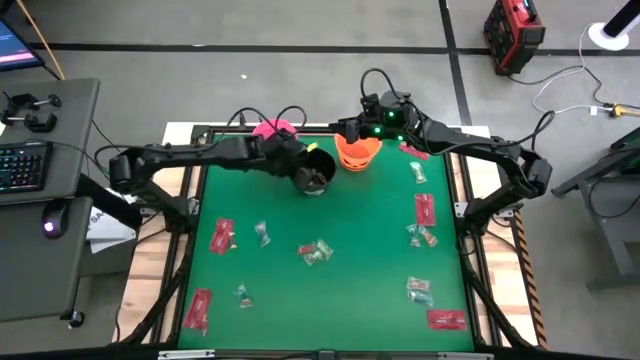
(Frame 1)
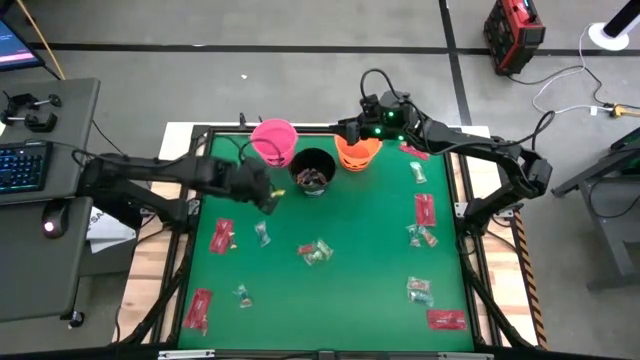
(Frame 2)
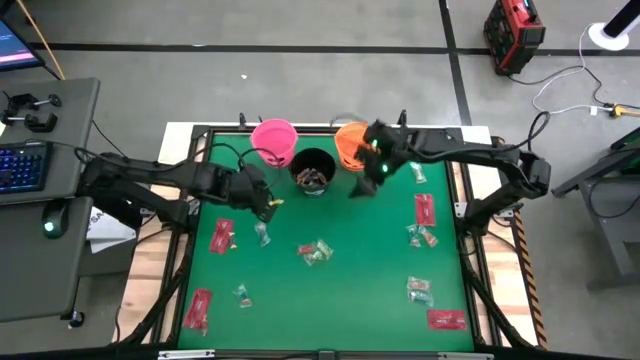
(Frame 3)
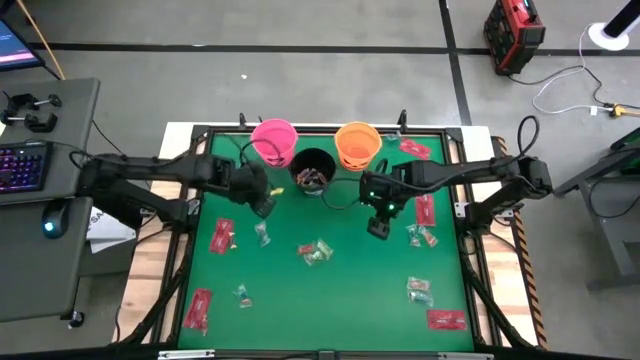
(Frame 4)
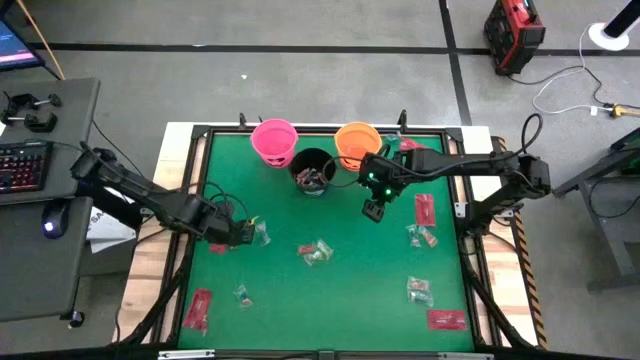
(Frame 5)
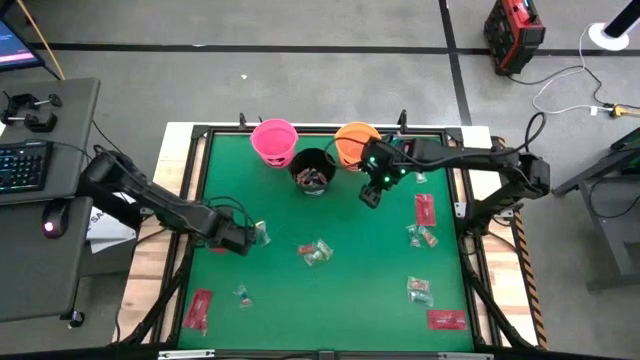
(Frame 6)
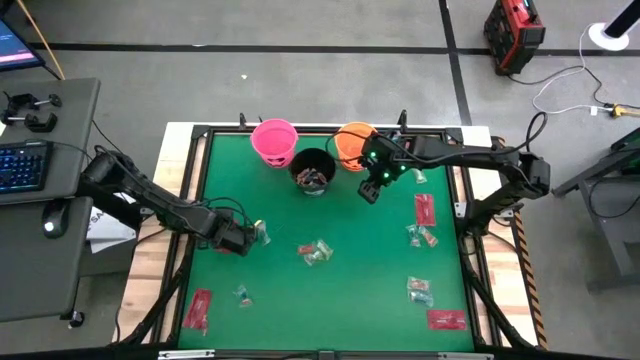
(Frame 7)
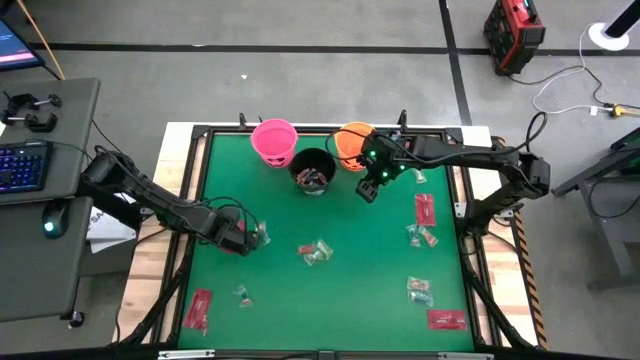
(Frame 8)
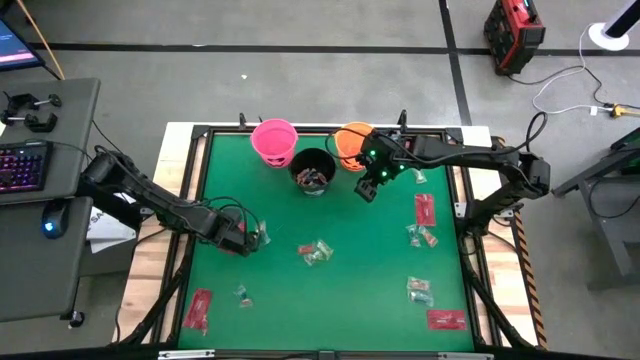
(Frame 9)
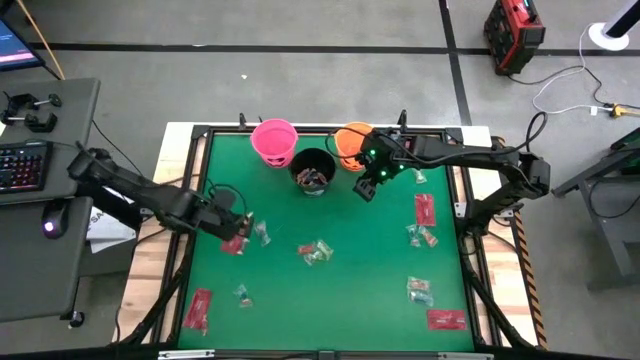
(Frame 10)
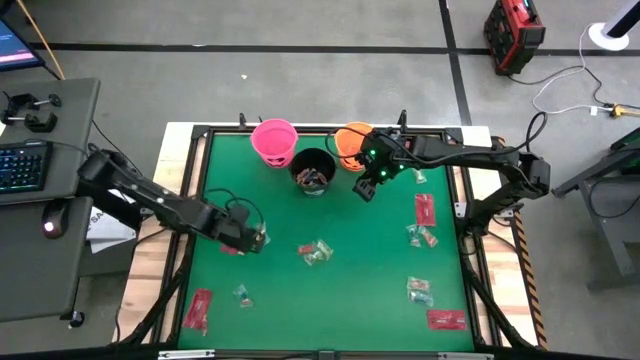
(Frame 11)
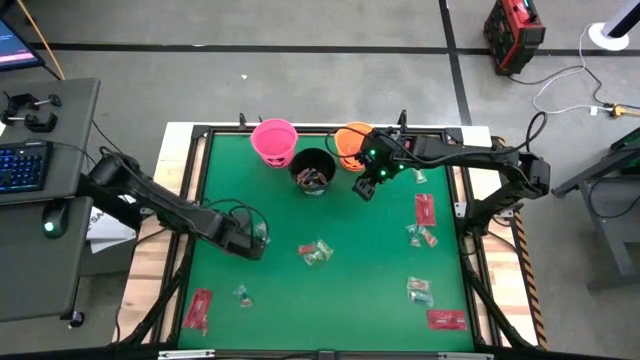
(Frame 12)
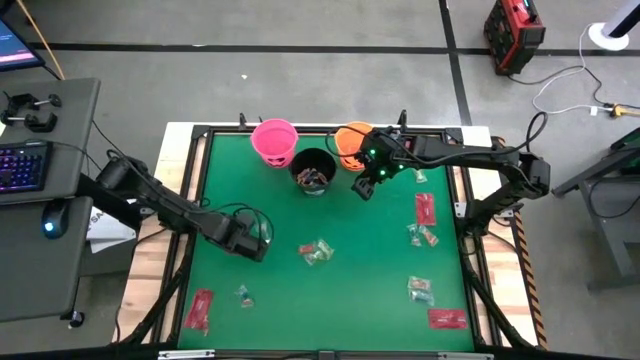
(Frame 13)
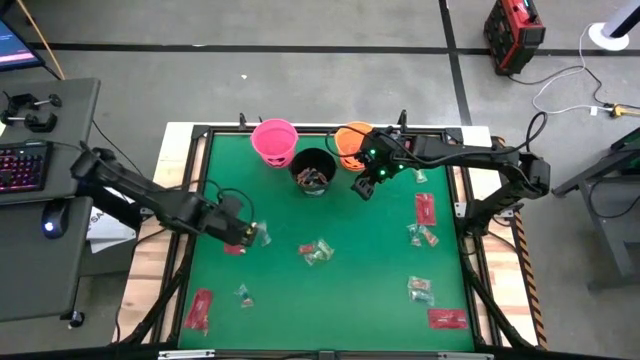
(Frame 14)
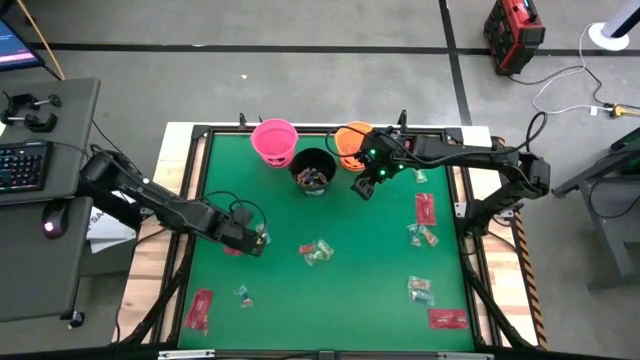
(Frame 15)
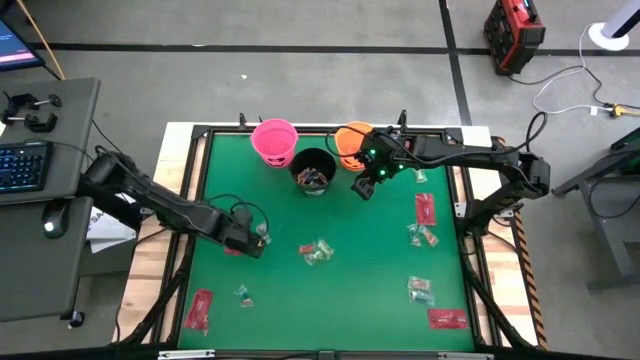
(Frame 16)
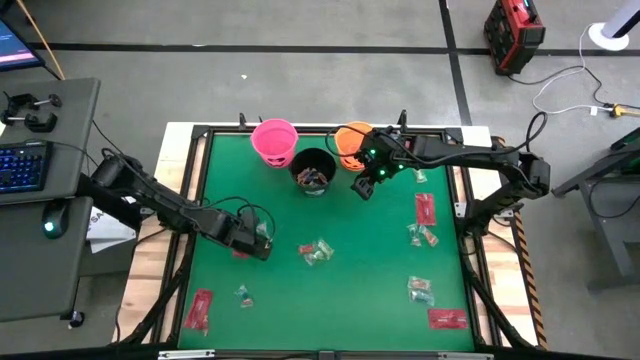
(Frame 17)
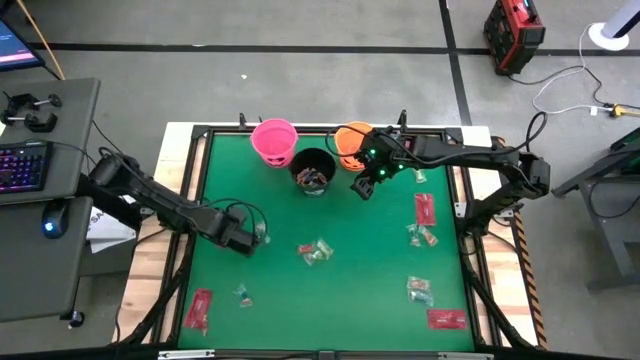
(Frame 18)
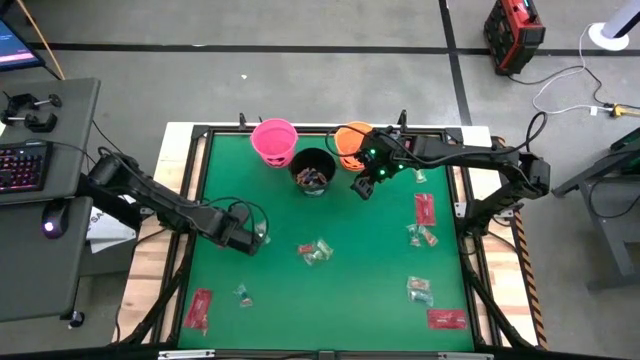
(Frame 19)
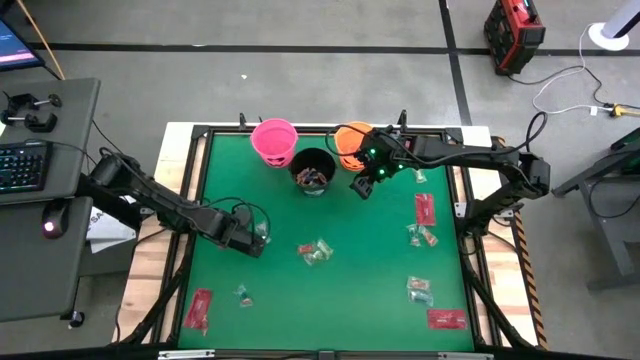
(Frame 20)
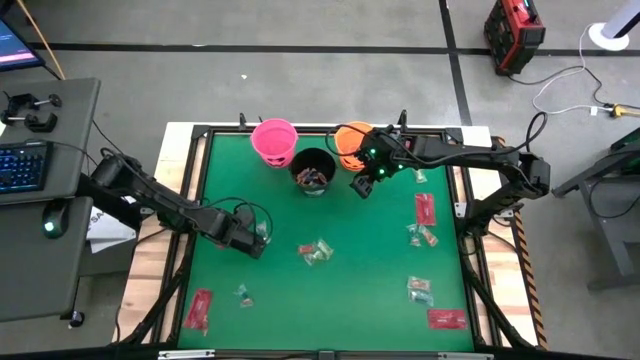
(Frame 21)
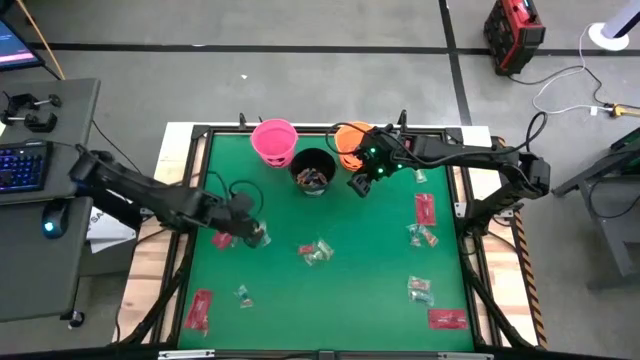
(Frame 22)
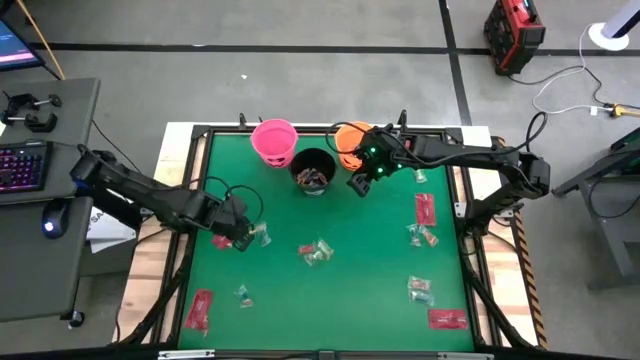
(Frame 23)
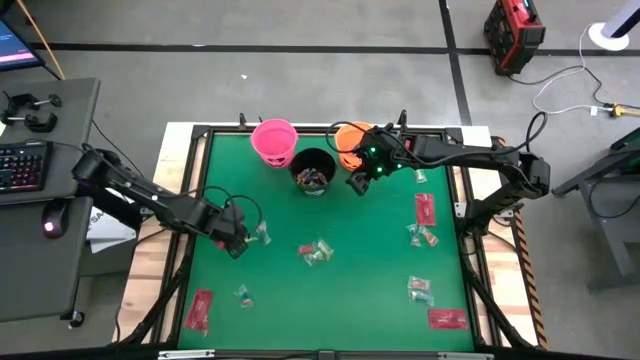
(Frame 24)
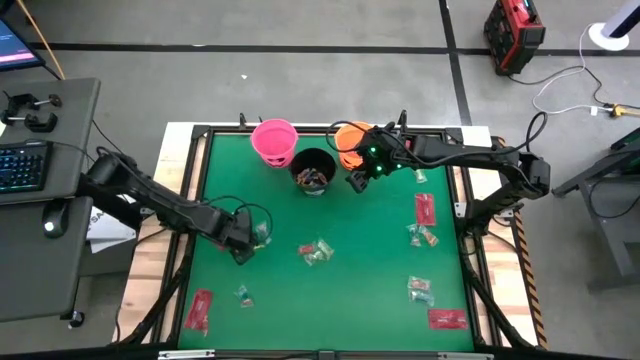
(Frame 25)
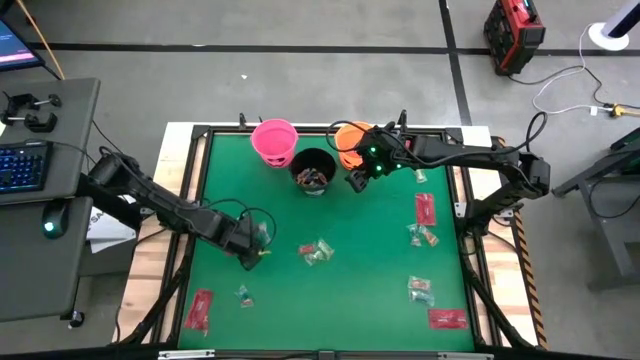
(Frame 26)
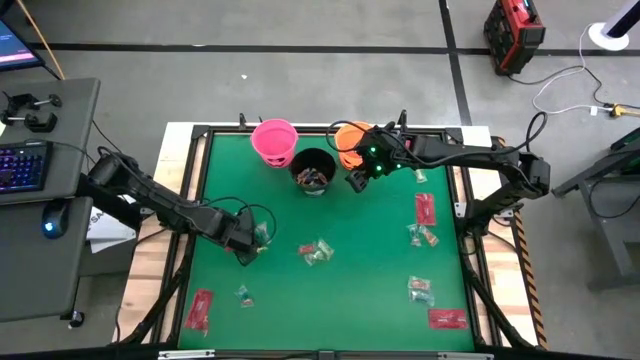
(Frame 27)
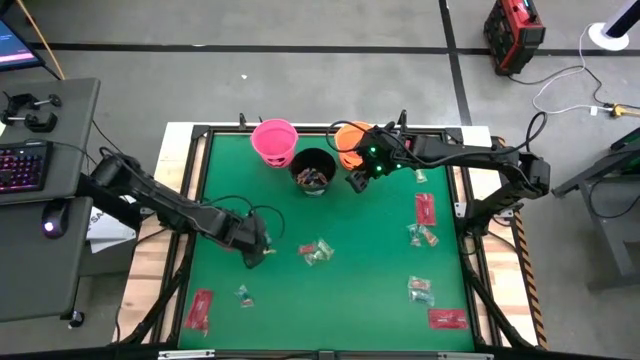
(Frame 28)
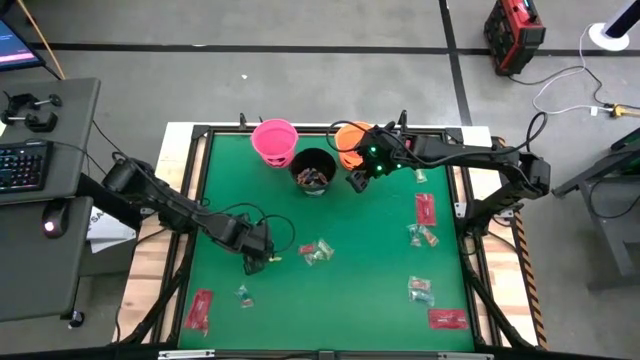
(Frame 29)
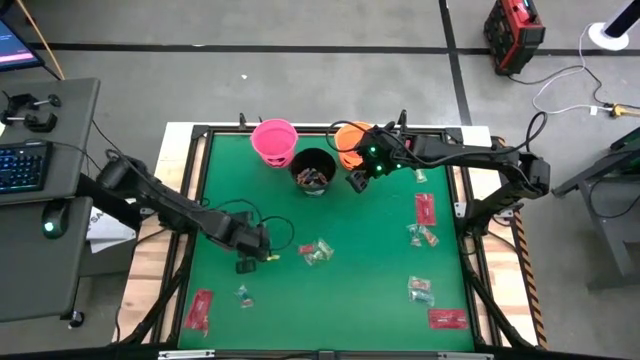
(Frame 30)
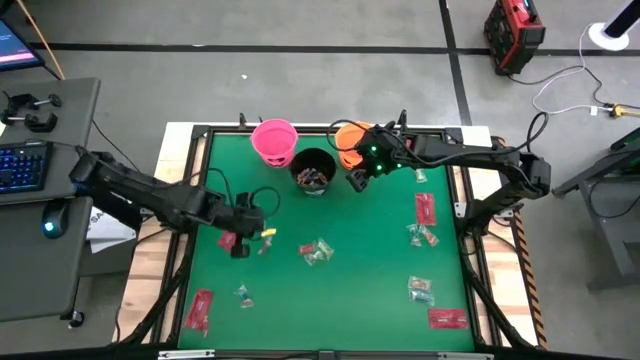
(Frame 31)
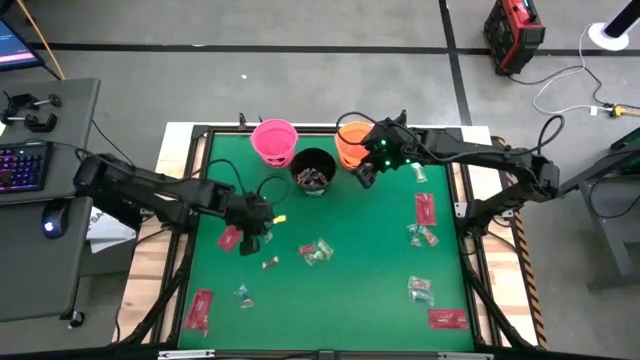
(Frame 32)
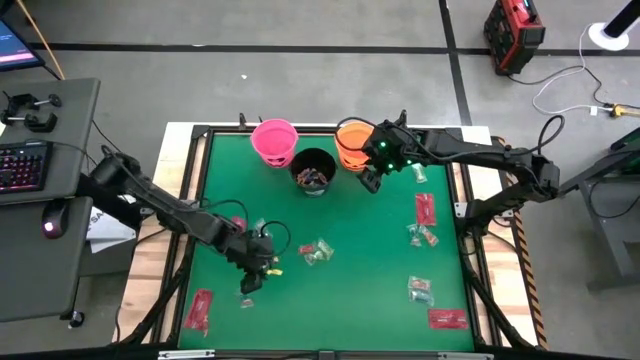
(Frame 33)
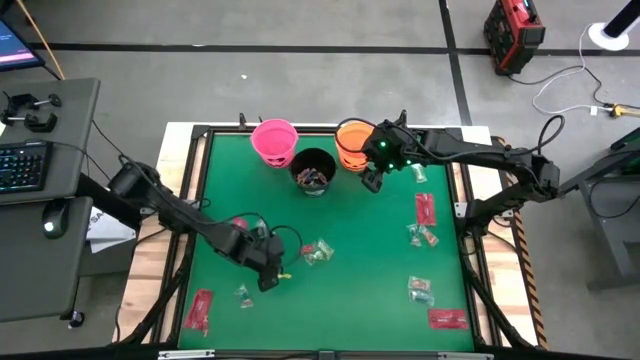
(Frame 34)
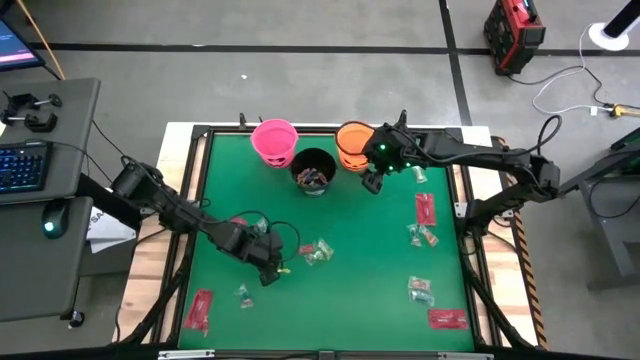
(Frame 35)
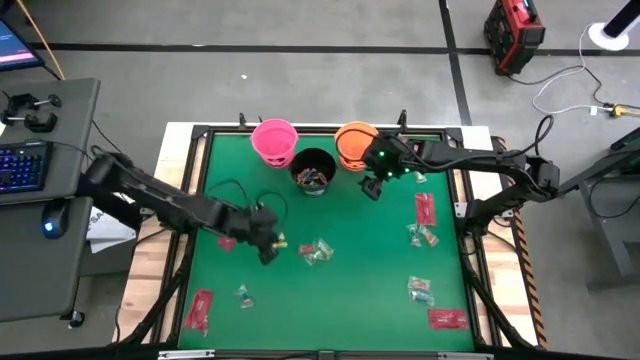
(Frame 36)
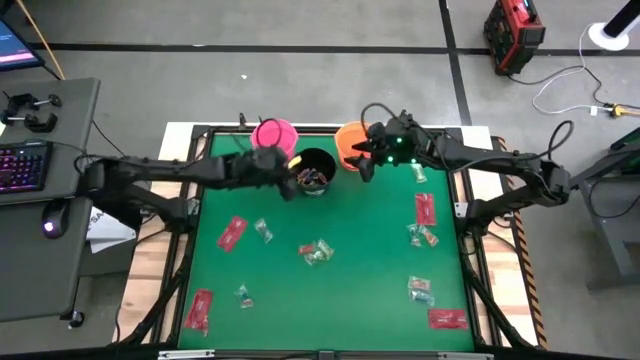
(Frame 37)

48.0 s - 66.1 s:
Task: Sort candy by brand, put in halloween buckets
Put the red candy into the black bucket

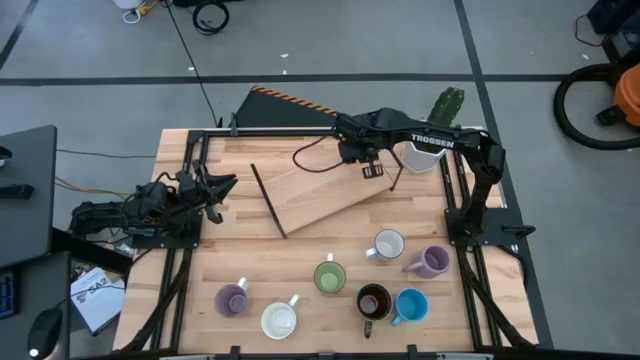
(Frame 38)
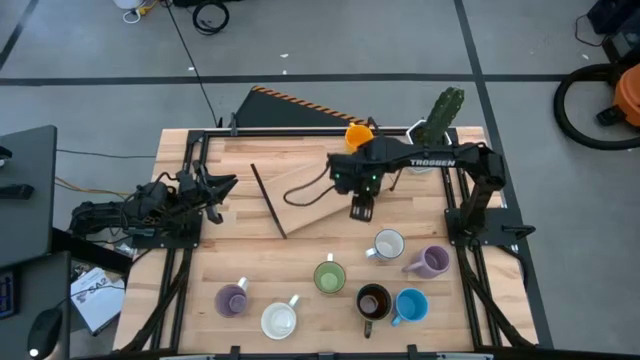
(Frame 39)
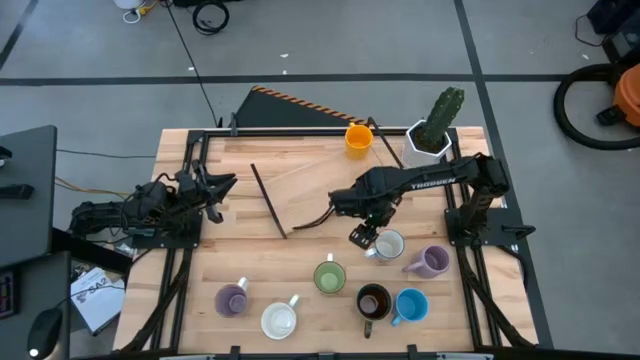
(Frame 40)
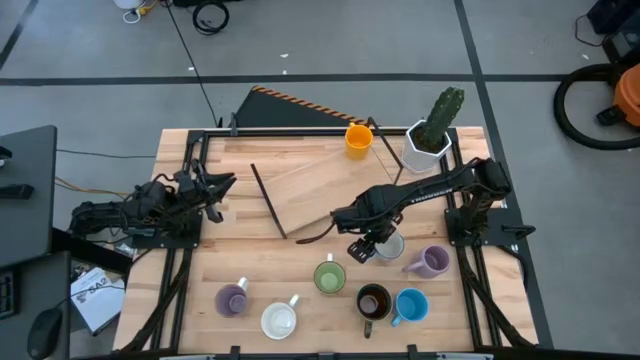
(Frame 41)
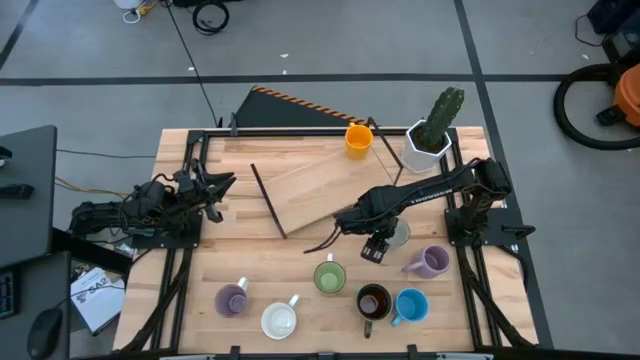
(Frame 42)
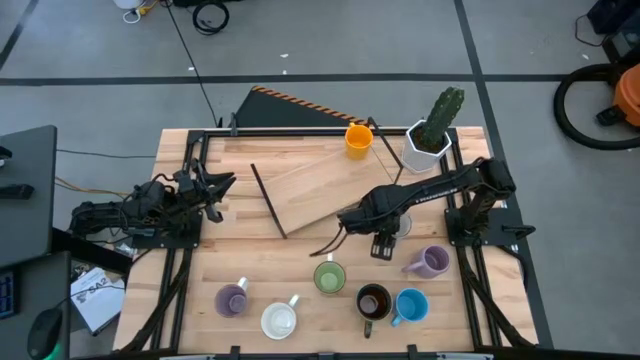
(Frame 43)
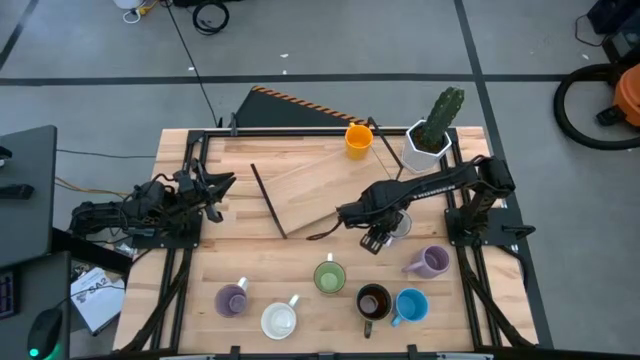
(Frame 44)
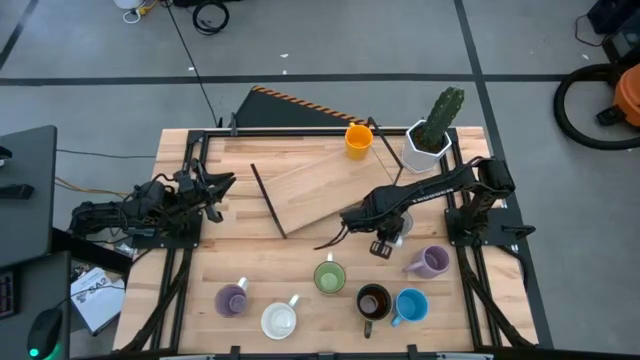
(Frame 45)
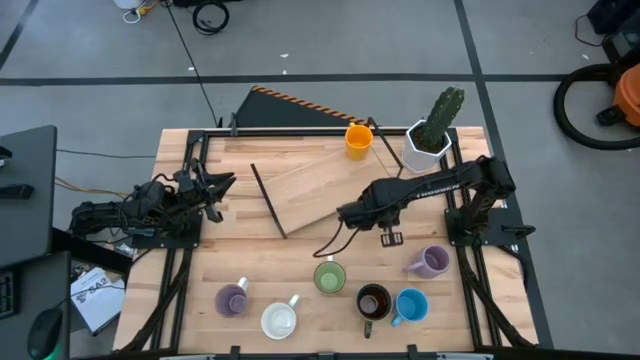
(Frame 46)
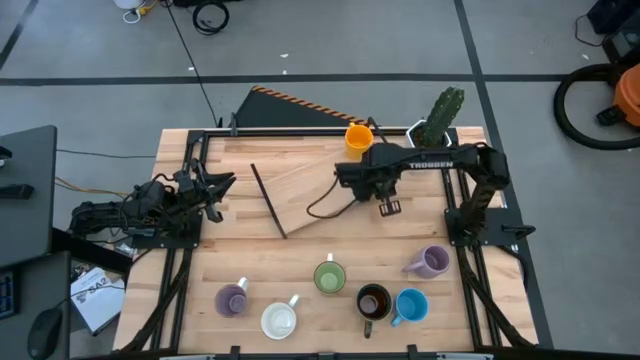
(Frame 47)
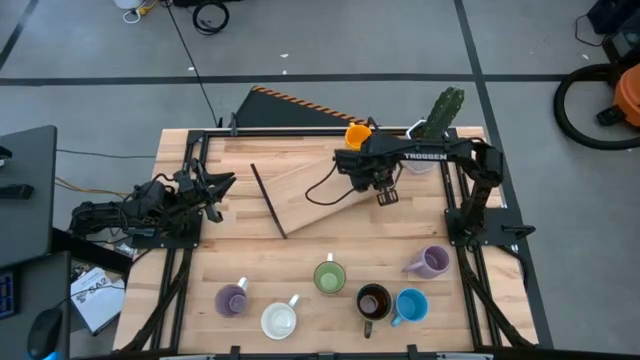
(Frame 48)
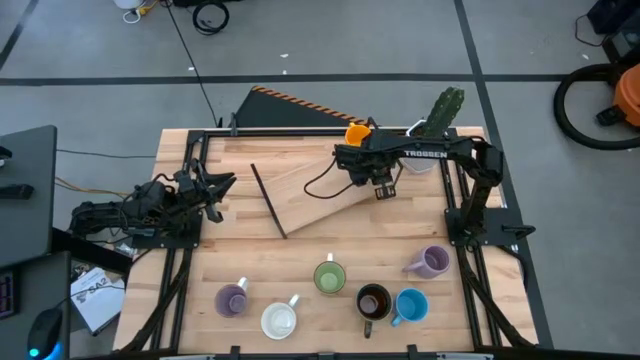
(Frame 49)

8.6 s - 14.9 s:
Task: Place coffee mugs
Put the blue patterned mug on the shelf
